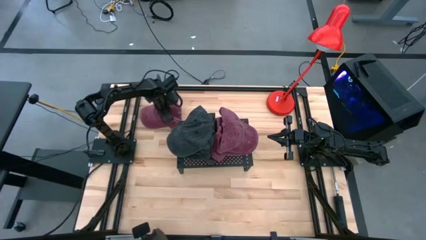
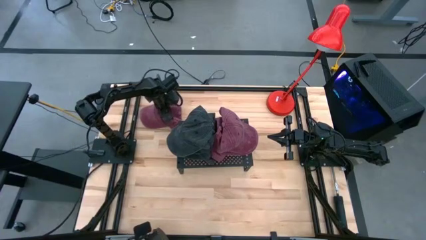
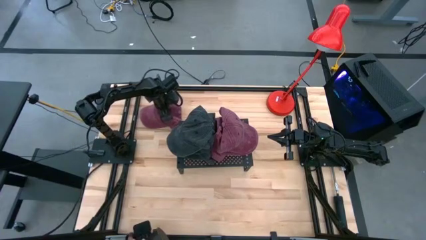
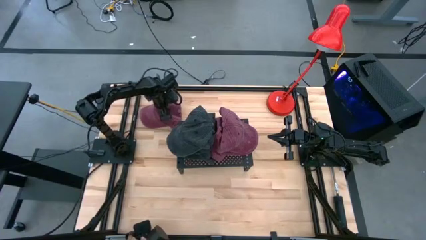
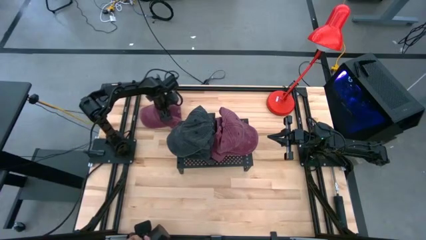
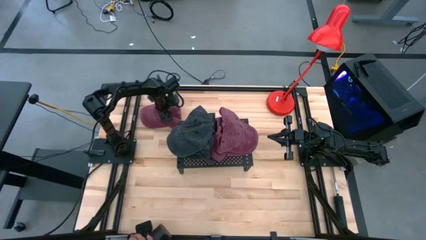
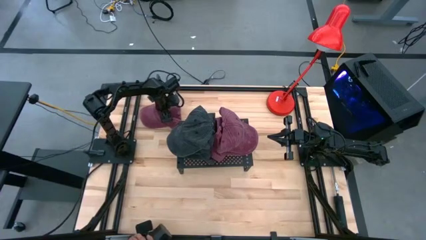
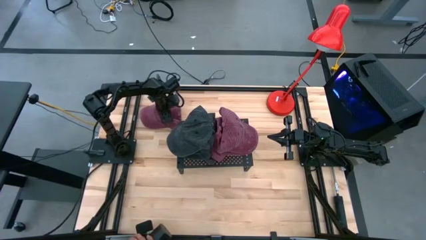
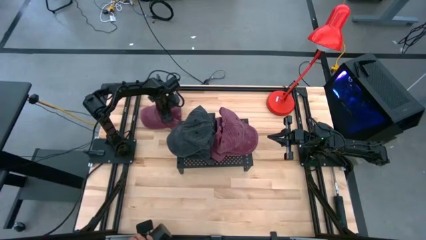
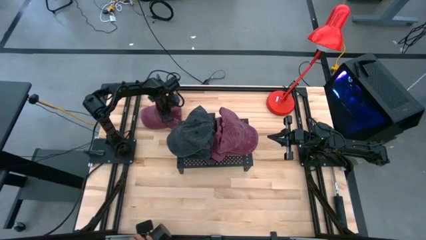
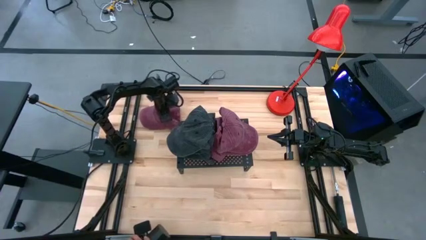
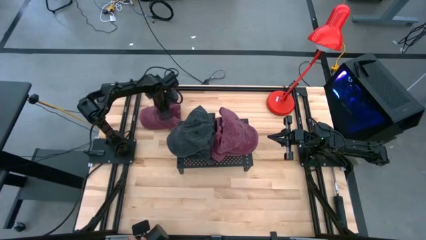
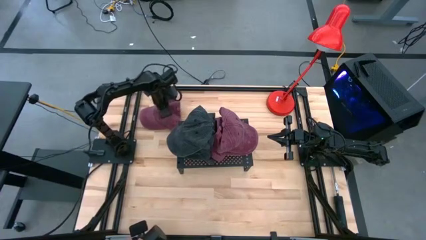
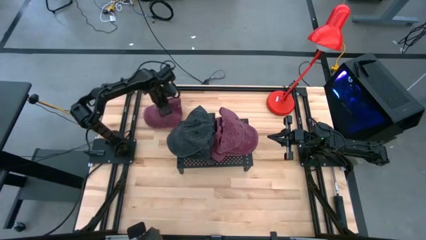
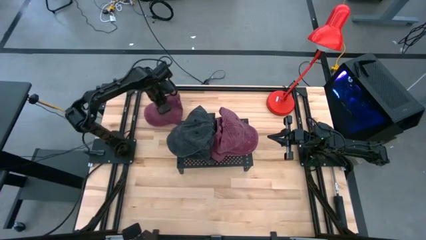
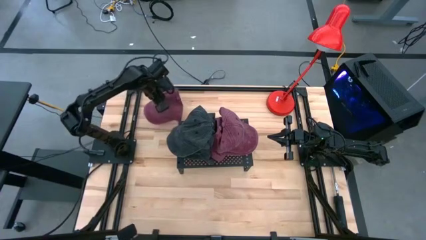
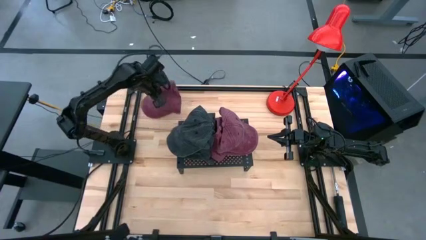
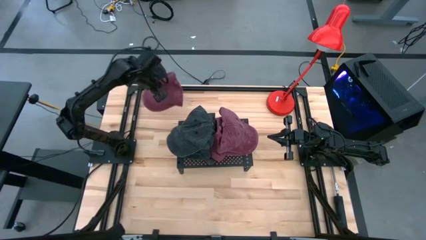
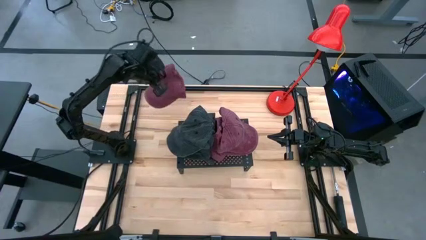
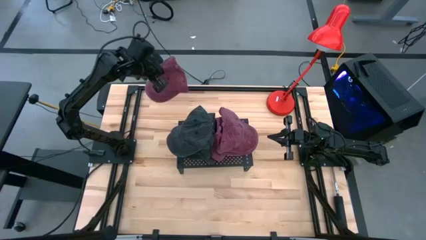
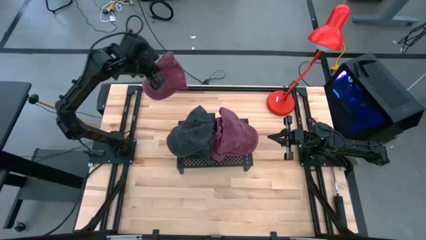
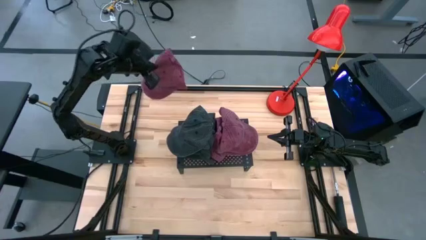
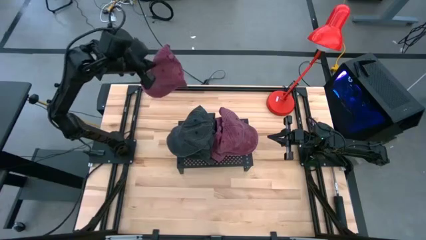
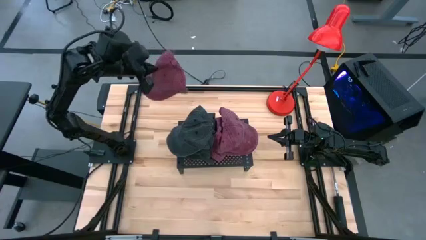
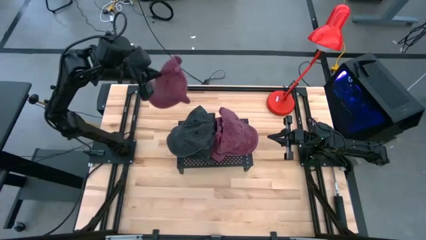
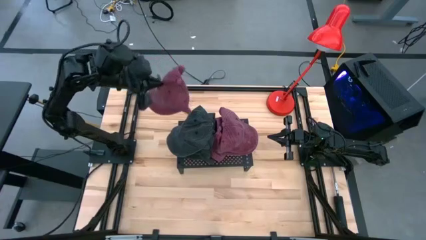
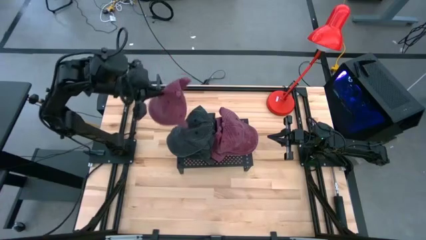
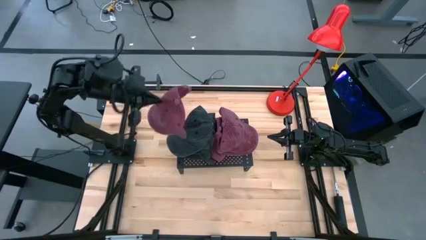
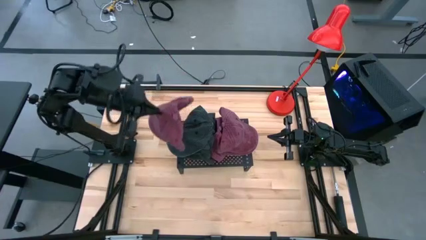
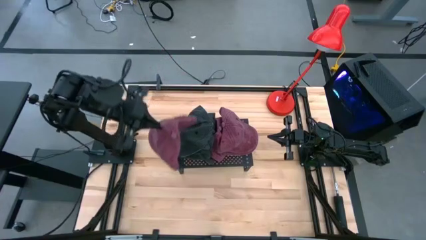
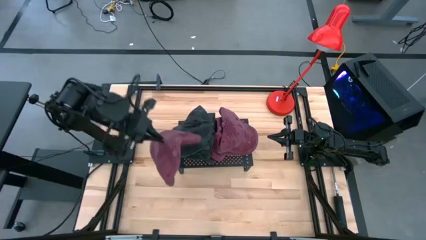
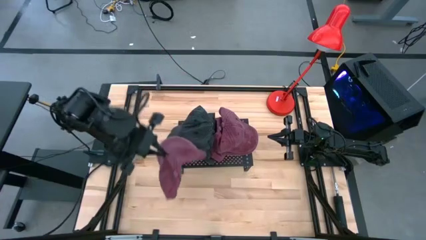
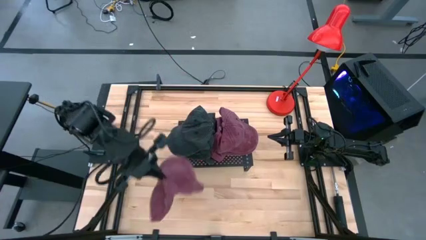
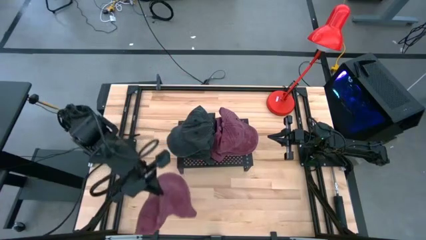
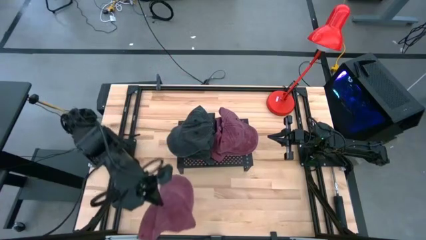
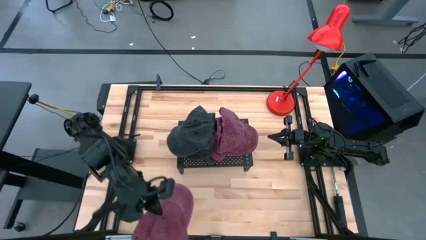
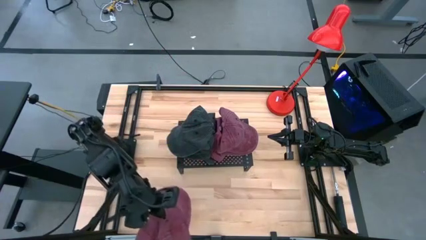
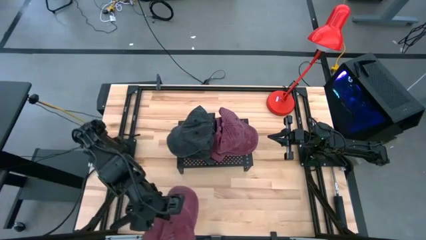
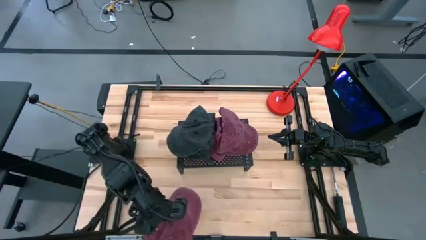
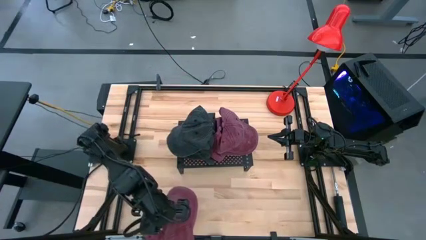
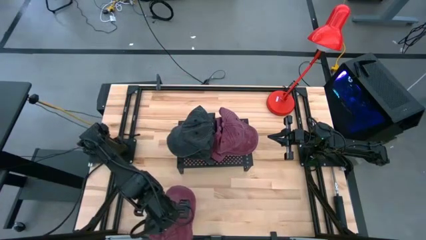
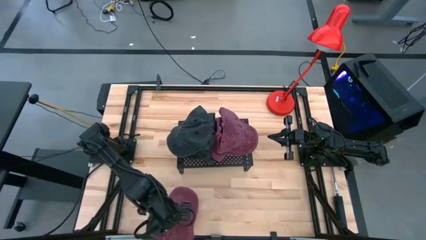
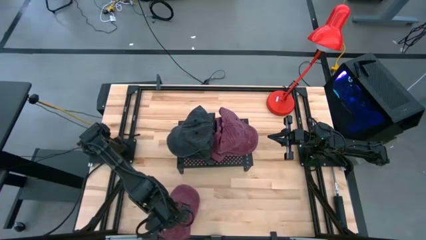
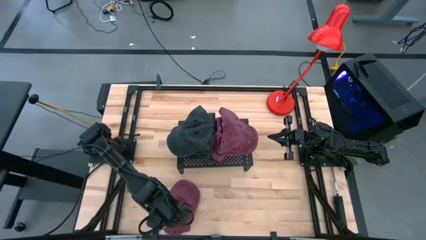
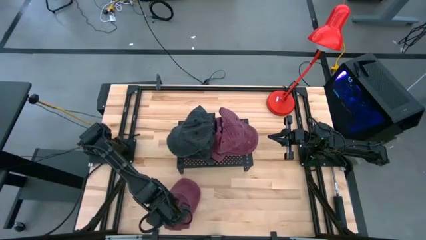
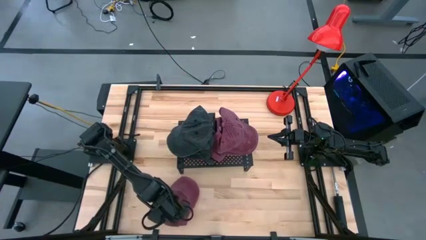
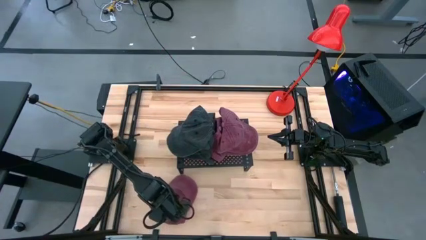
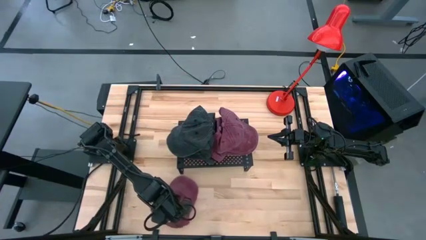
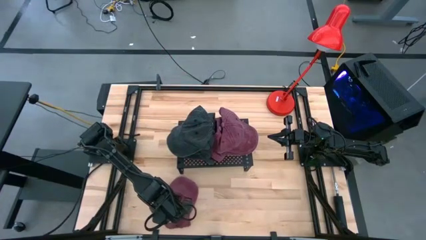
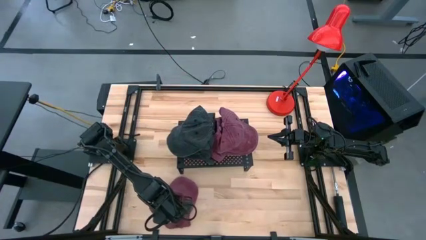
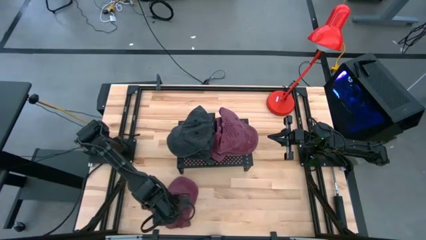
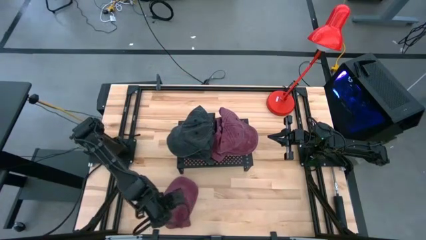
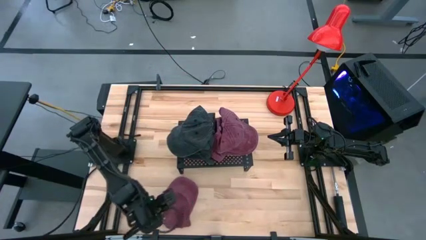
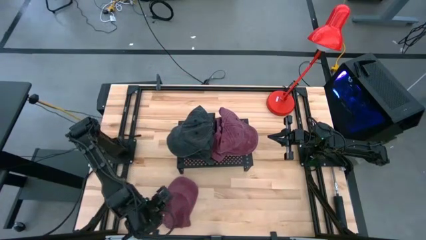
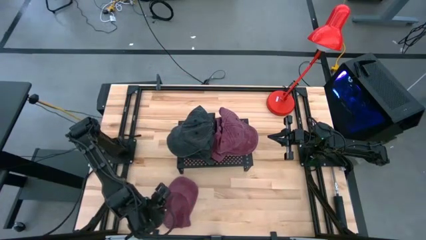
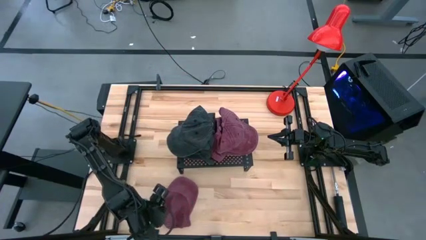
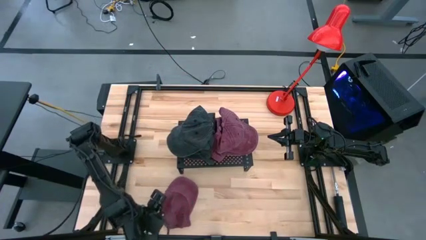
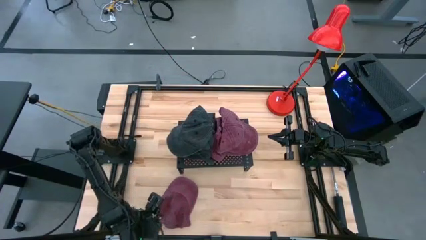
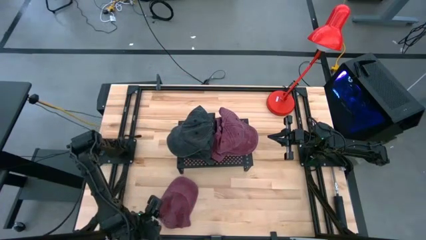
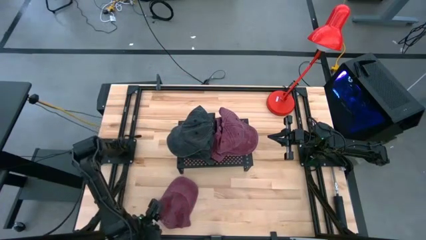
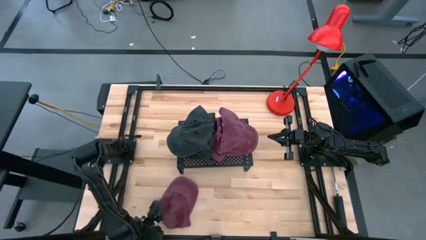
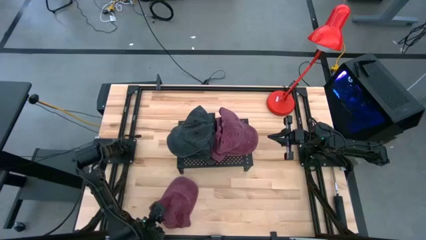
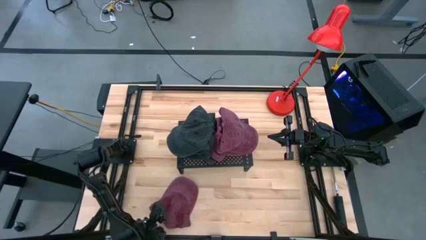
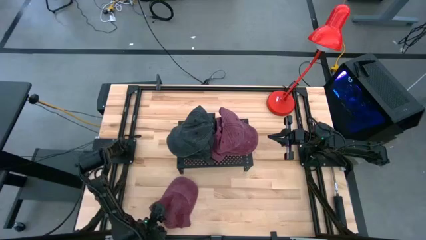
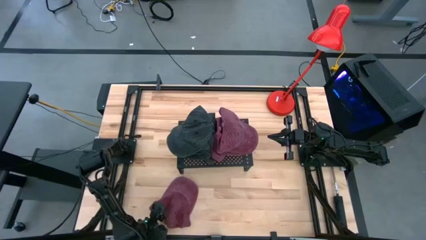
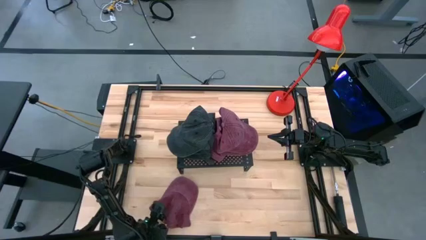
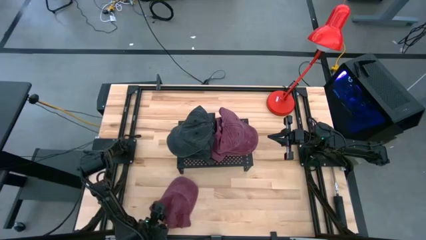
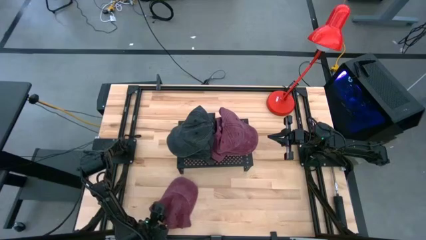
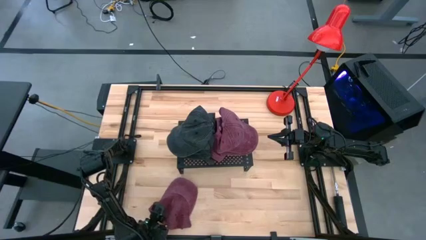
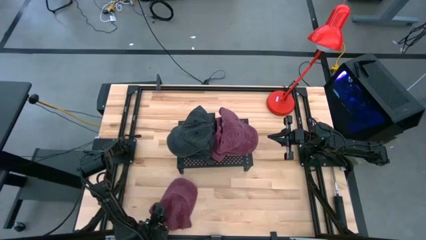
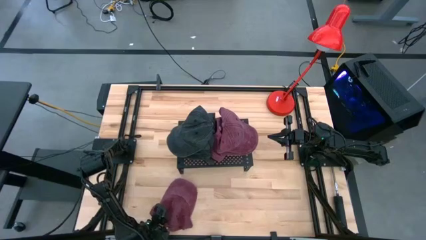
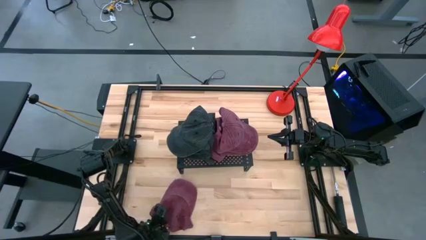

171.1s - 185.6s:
Task: Pick & Place hat
Stack the red cap on top of the red cap on the shelf

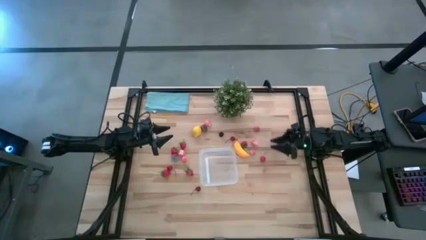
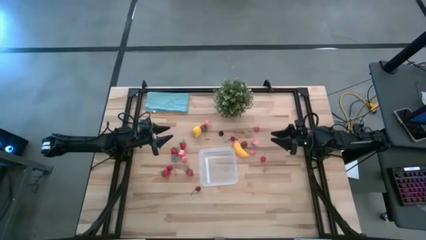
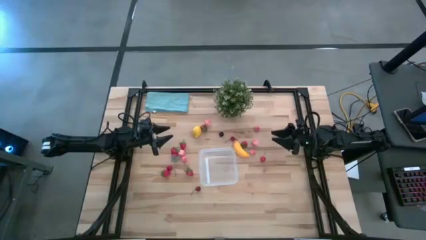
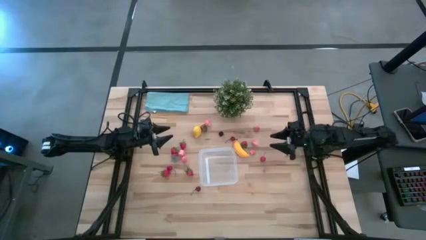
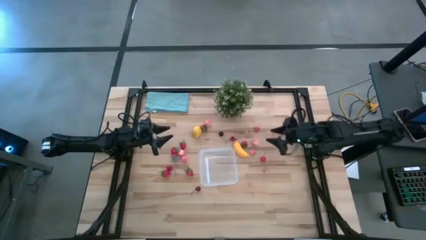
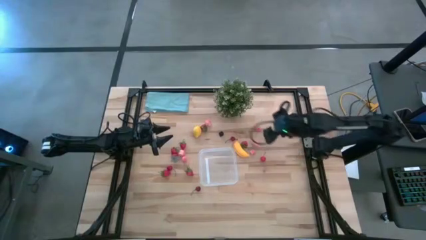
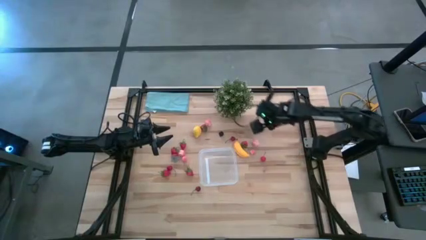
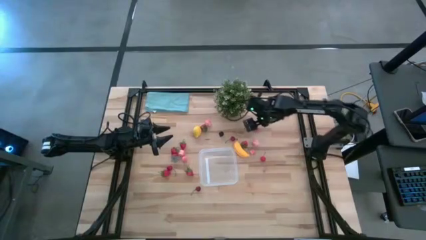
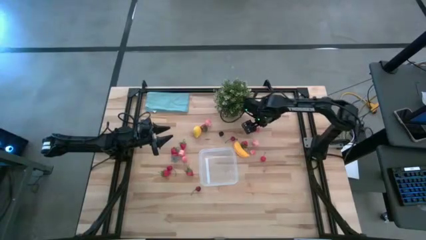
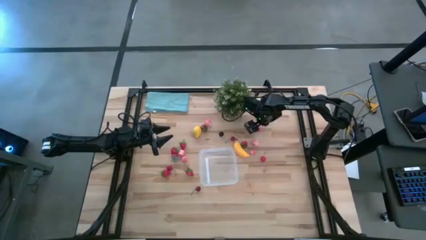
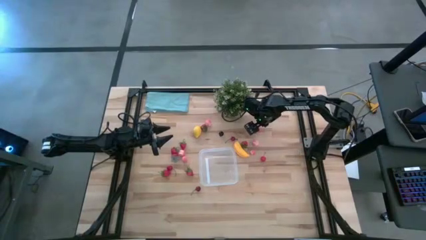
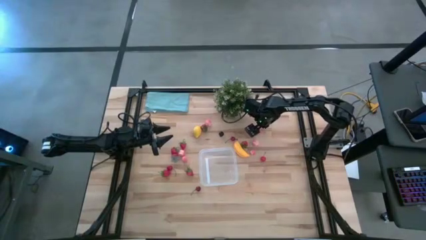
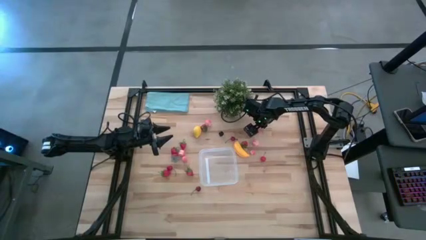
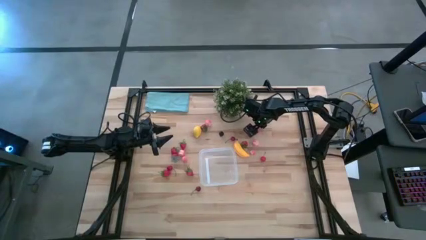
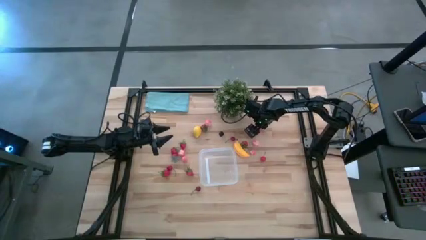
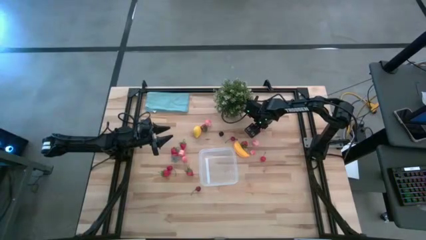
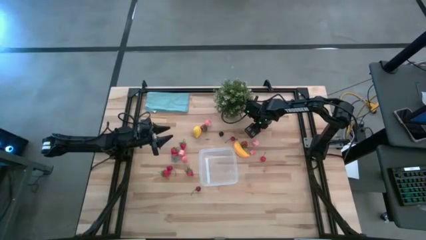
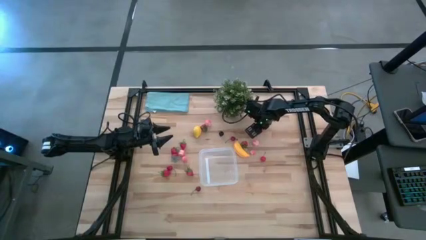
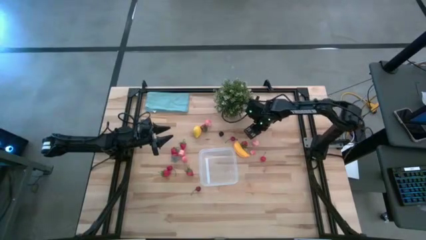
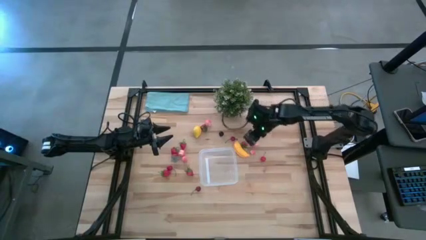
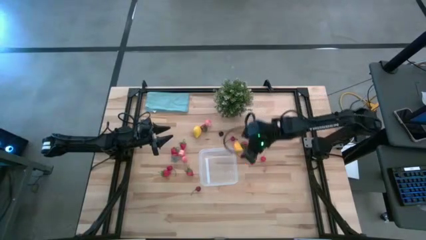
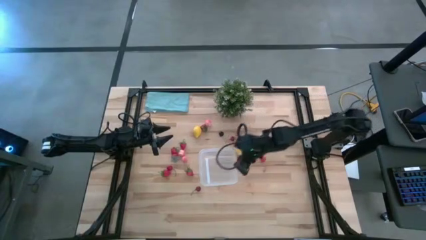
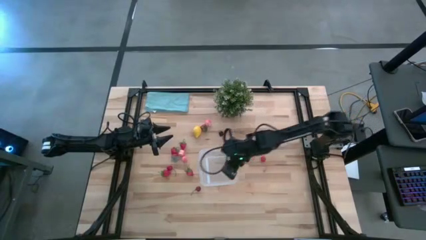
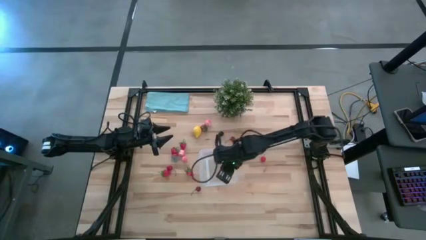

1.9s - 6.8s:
Task: Pick and placing Produce into tupperware
Put the pink peach into the transparent bin
